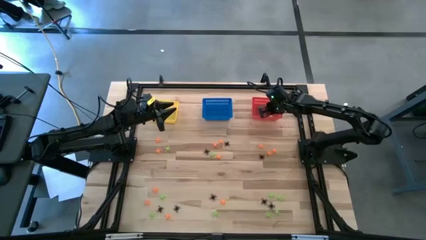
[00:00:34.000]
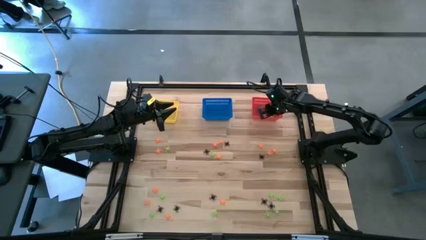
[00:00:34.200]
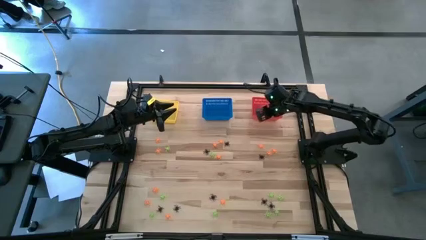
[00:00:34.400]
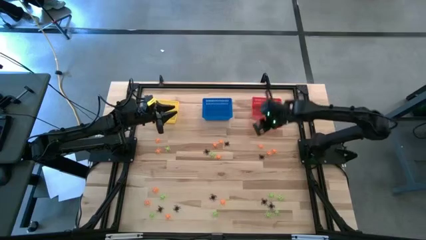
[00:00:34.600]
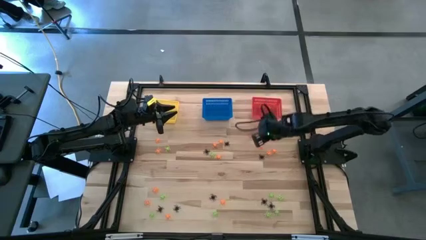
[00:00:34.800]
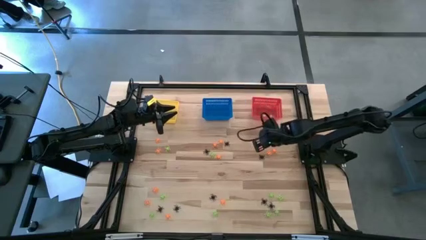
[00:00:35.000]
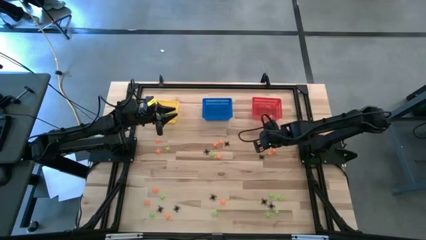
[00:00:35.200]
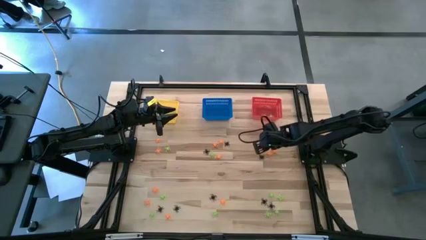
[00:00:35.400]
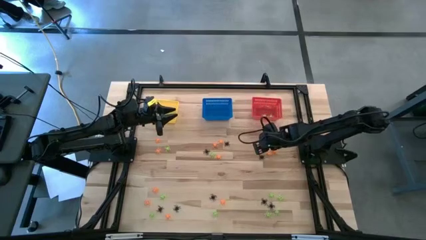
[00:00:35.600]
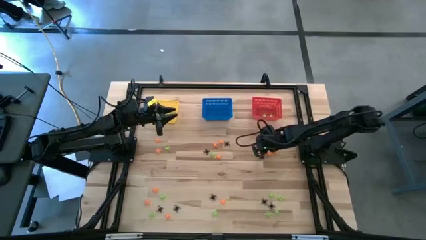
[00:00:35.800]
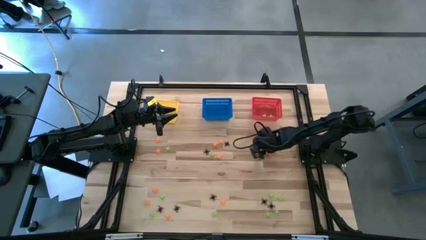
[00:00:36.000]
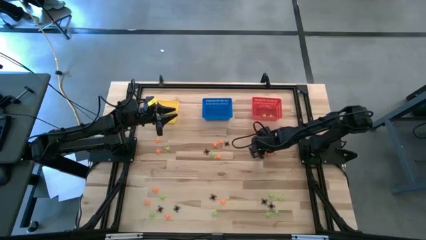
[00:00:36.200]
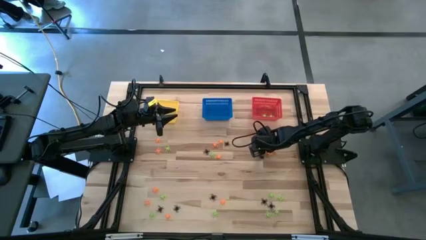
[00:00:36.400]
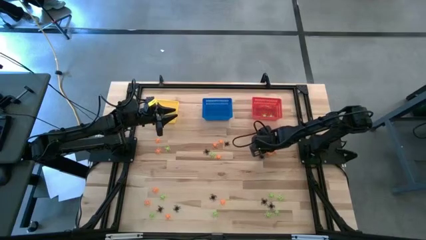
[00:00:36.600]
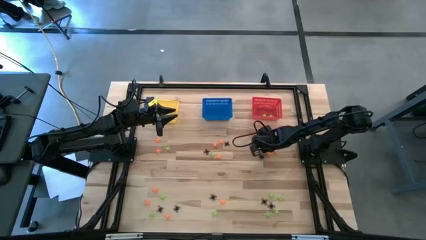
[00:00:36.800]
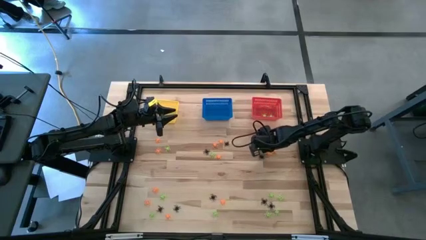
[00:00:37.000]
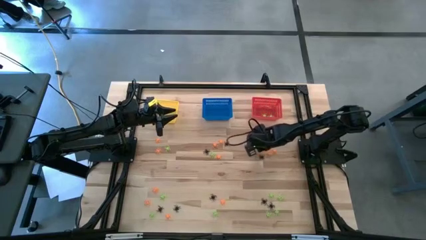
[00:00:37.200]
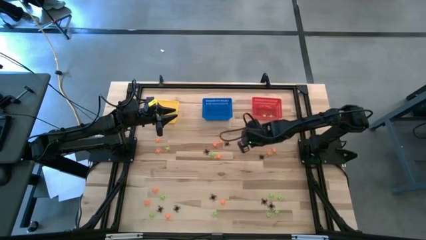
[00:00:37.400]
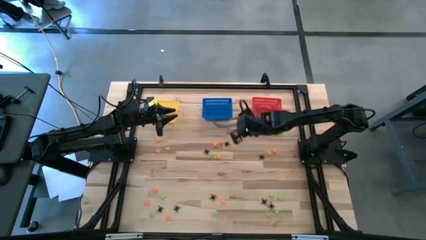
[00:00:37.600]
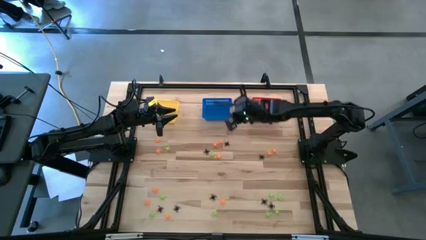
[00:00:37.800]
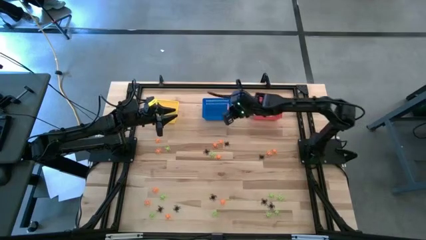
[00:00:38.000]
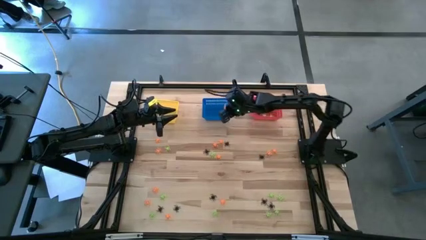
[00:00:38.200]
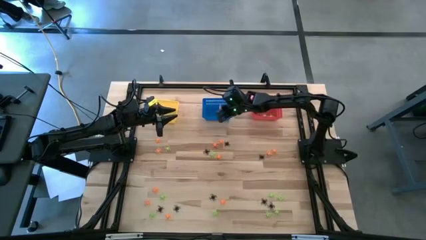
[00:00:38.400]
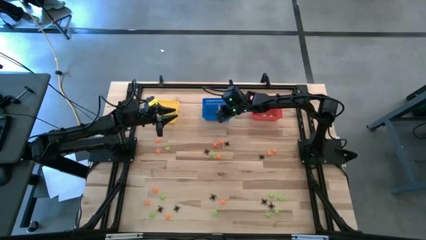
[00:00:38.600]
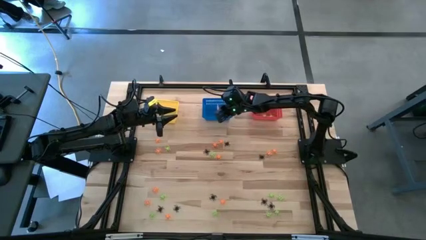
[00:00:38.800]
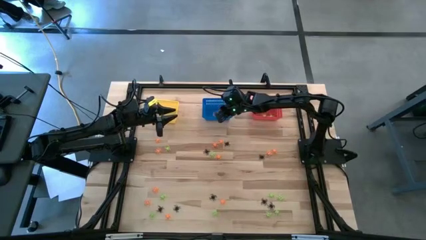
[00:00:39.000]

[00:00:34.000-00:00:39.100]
Task: Sort Halloween decoration
Put the orange spider toy into the blue basket

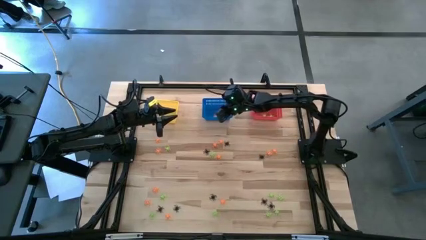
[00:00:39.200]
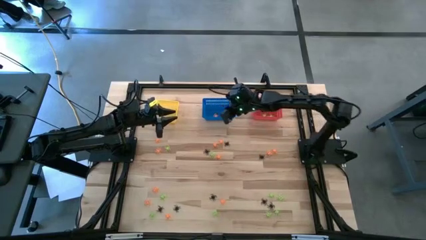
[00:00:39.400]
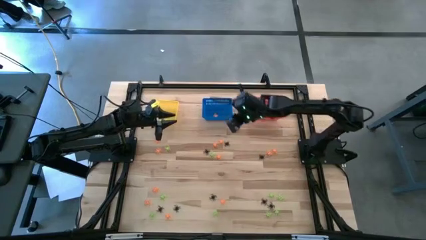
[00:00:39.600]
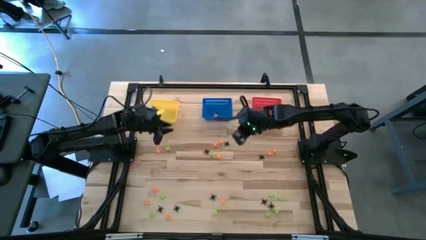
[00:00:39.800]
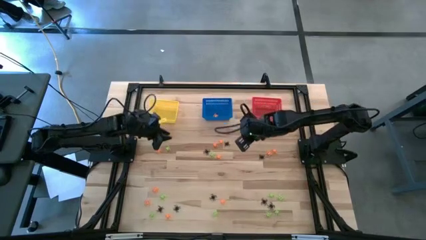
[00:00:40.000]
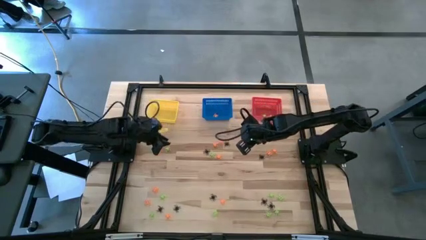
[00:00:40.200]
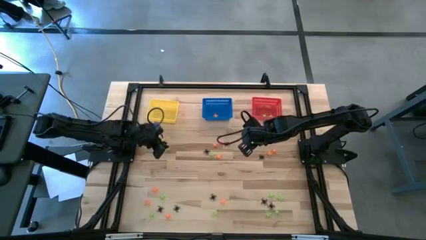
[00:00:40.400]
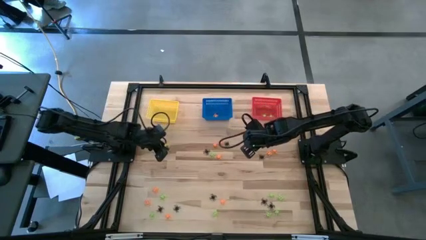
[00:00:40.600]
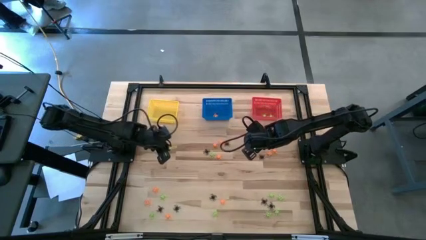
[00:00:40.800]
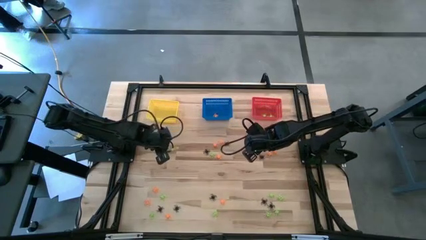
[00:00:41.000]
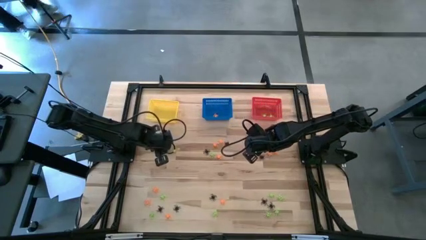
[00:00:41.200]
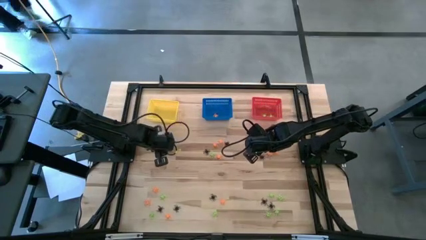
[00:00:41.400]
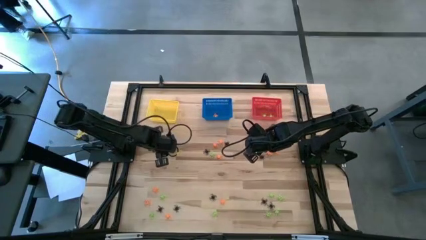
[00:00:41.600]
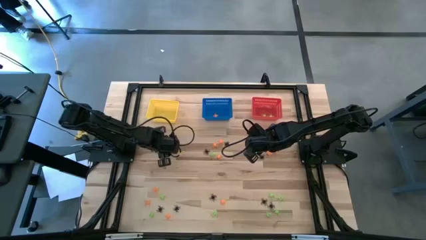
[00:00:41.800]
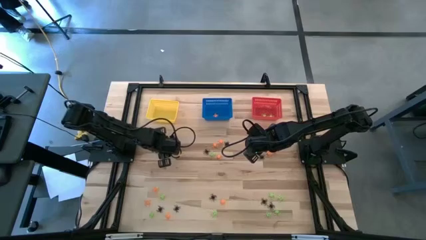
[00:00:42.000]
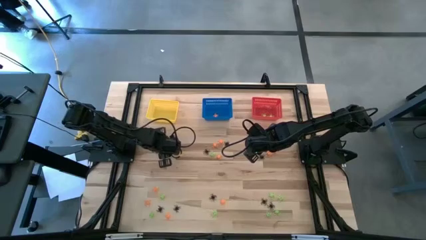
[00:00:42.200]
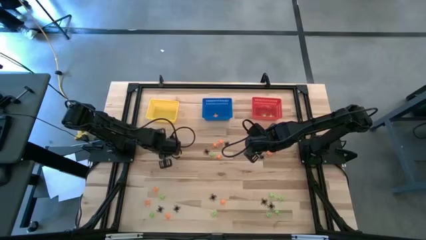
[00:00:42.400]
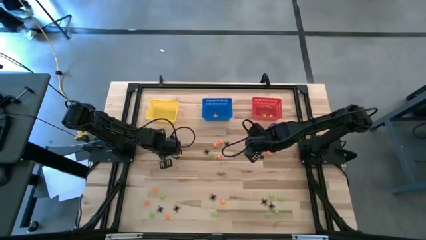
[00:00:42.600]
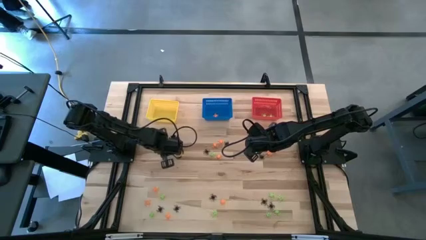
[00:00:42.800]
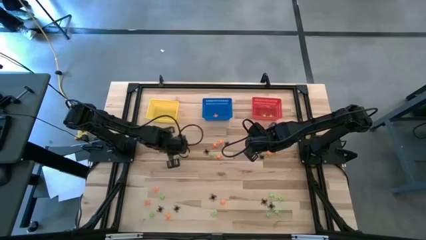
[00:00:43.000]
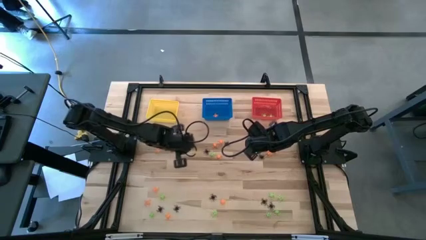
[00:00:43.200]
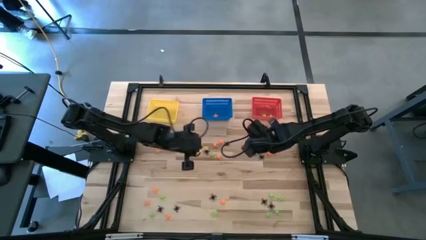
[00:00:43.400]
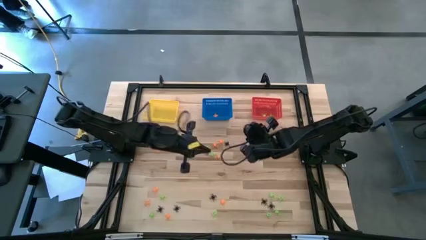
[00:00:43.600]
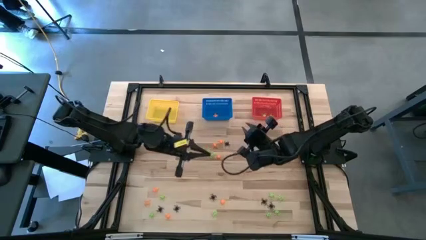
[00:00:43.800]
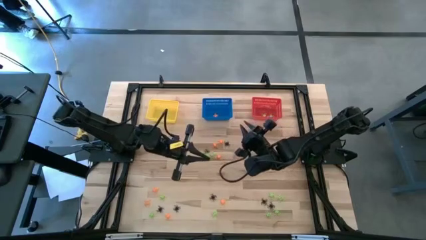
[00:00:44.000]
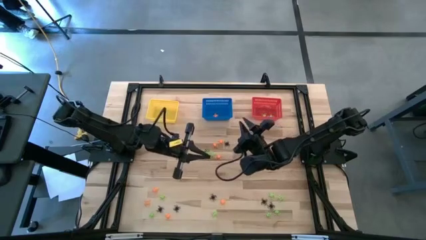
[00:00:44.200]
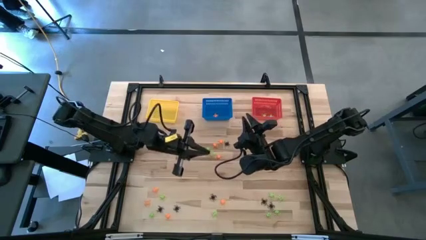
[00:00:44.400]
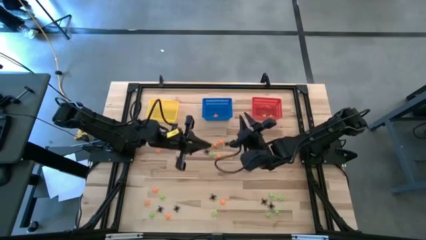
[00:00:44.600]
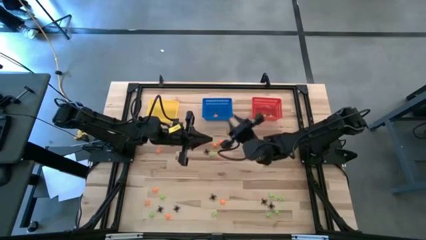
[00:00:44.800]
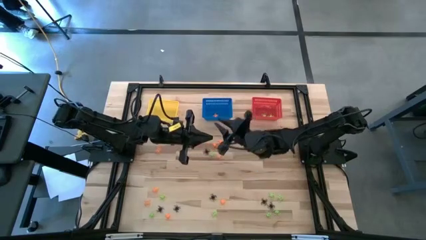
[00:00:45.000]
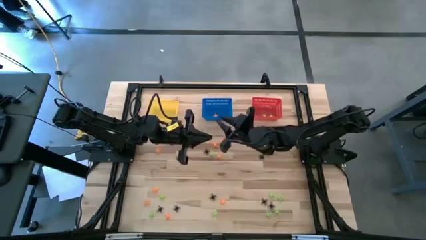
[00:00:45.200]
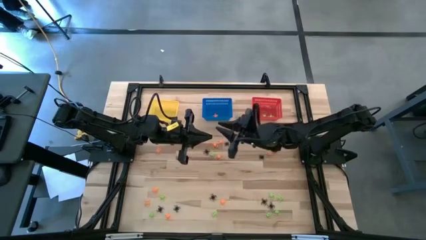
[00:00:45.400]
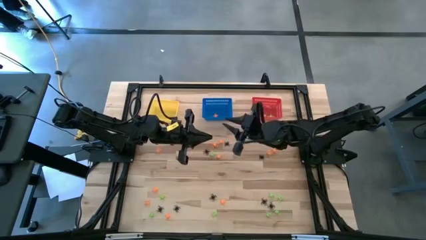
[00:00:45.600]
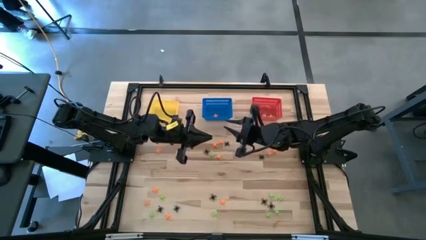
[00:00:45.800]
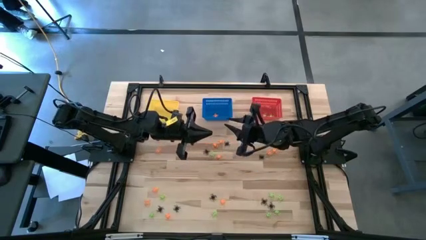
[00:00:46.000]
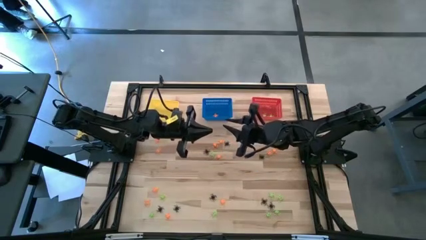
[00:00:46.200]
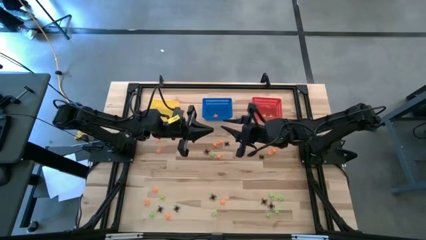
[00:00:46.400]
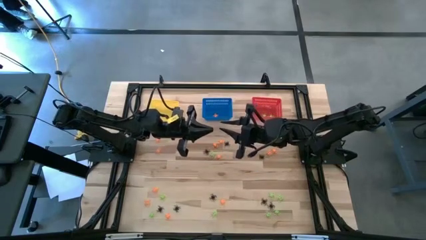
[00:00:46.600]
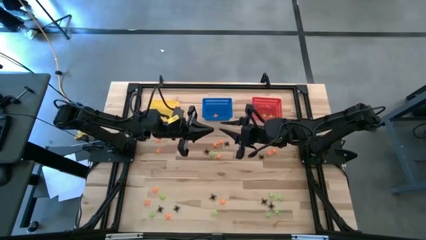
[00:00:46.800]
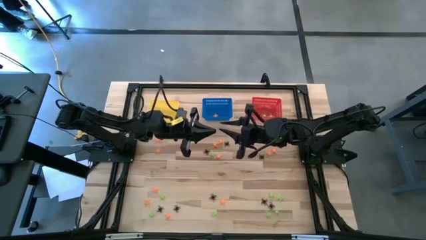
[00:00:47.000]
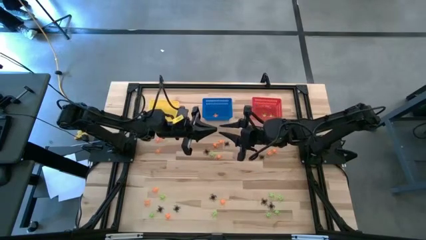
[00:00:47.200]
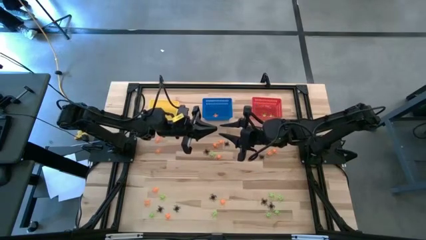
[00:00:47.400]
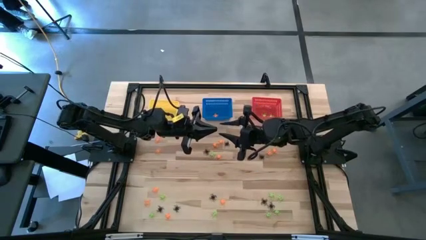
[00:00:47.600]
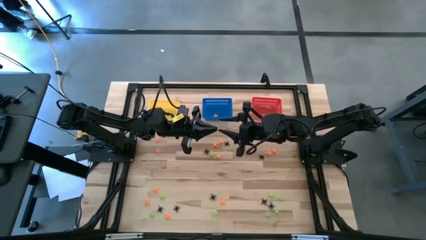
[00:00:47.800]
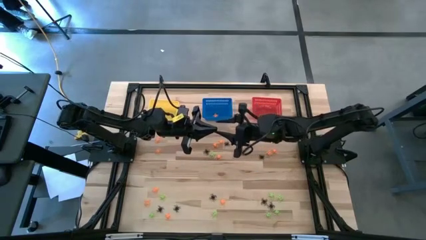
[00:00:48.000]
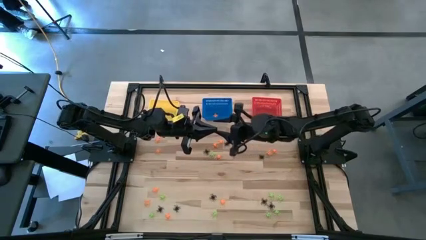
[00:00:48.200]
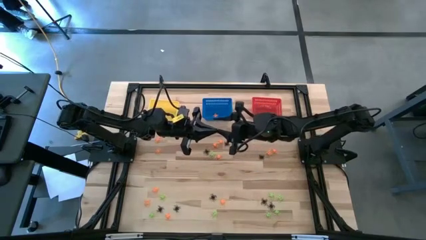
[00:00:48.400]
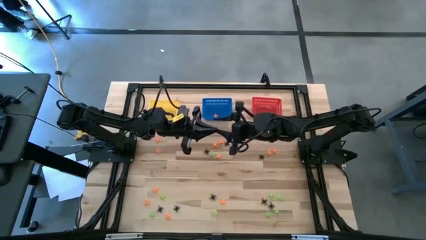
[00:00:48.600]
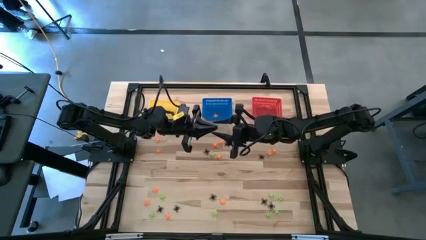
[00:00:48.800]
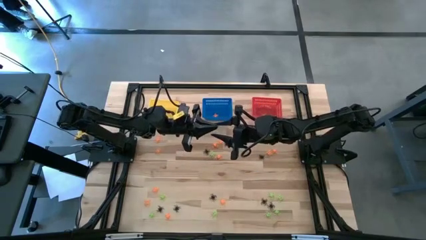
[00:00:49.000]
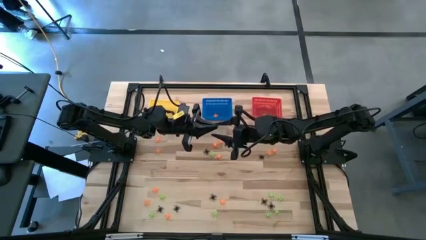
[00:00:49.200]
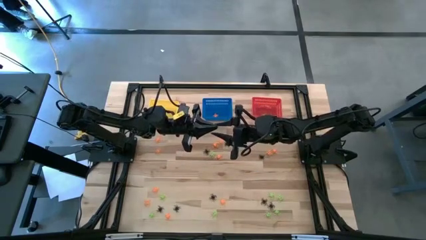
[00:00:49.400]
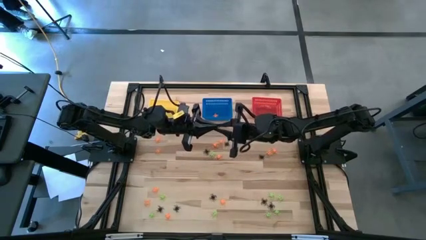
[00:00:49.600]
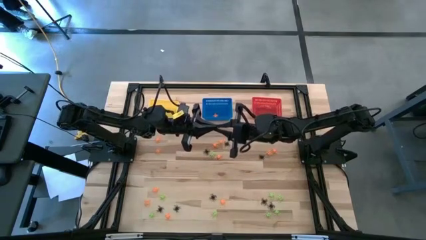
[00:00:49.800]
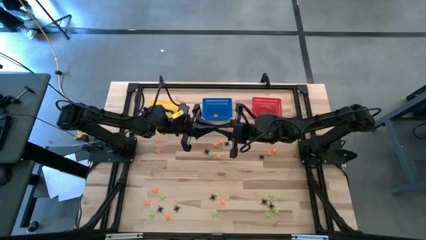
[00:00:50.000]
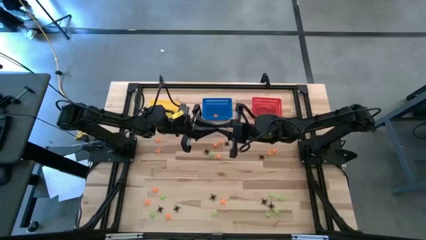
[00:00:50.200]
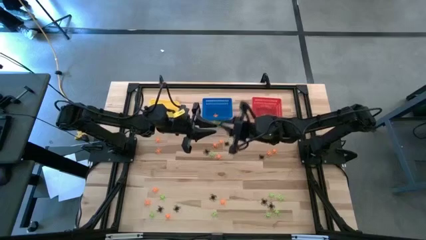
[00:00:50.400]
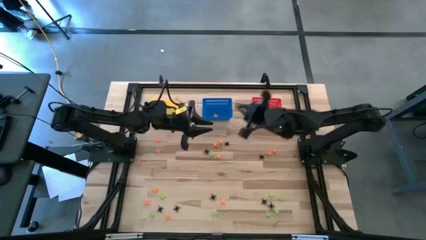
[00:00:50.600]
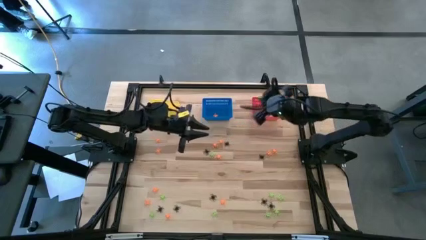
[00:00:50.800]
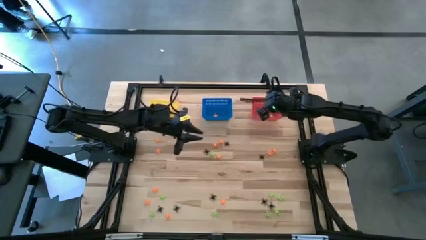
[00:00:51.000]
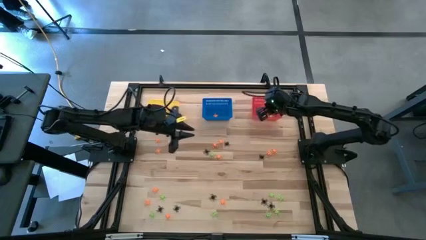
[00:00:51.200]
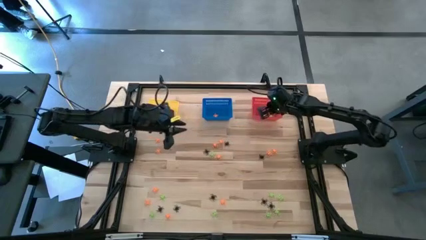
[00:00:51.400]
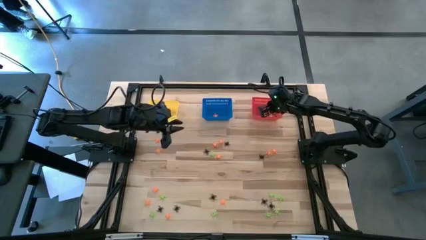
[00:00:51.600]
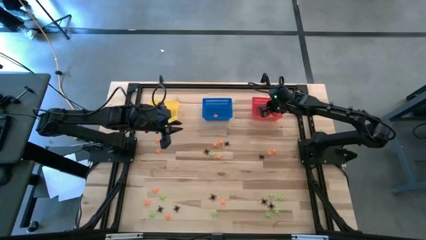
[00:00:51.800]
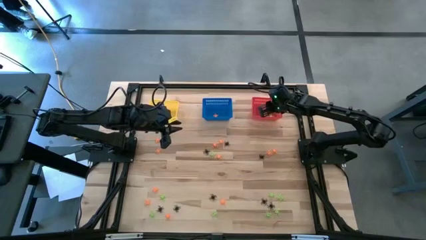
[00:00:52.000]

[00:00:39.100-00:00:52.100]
Put the green spider toy into the red basket
